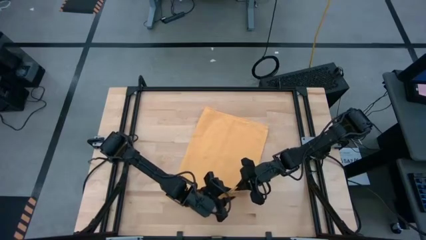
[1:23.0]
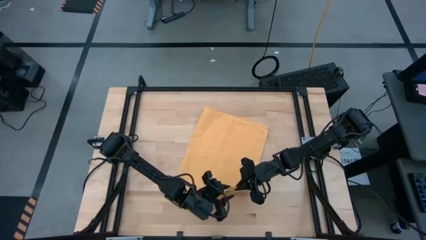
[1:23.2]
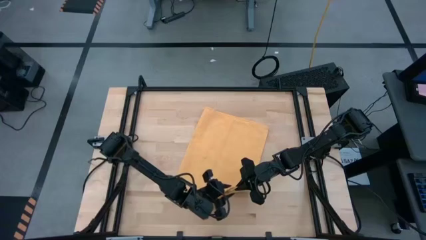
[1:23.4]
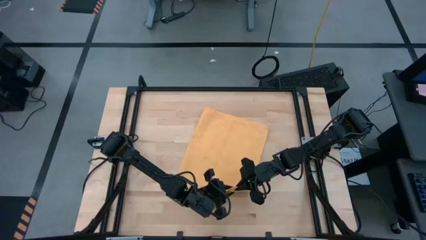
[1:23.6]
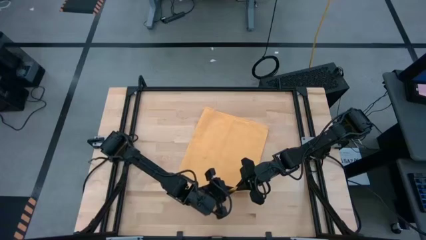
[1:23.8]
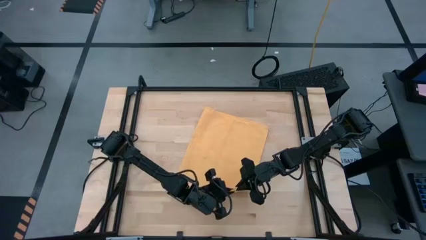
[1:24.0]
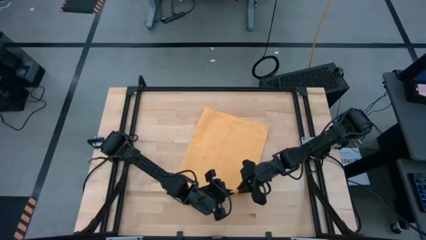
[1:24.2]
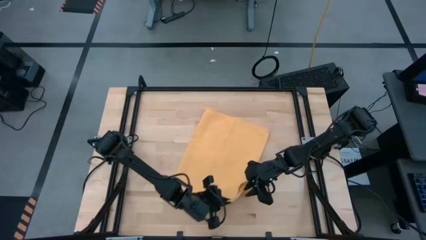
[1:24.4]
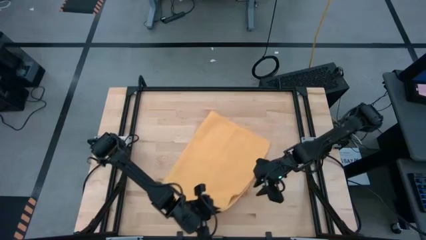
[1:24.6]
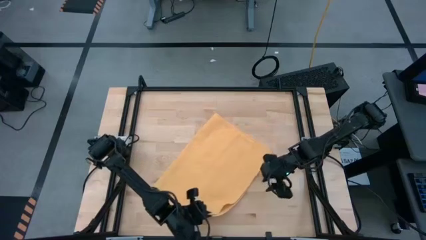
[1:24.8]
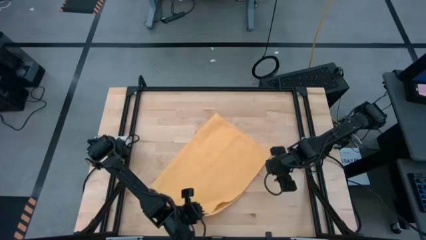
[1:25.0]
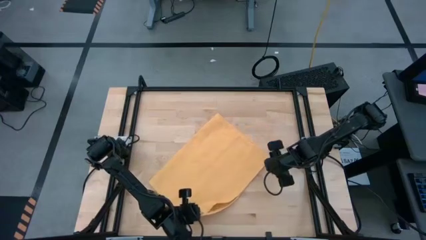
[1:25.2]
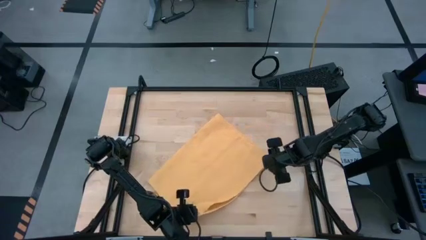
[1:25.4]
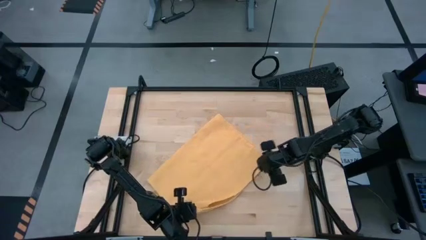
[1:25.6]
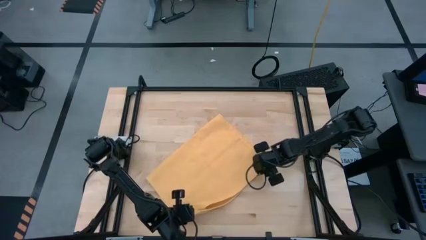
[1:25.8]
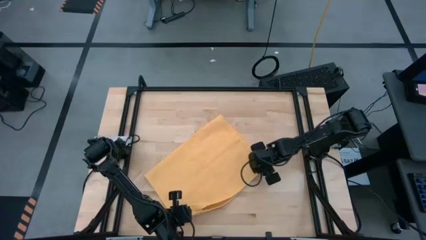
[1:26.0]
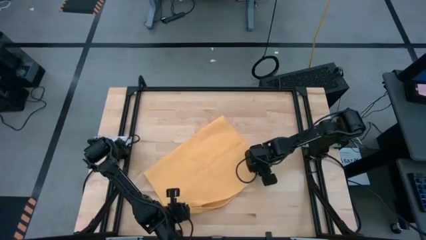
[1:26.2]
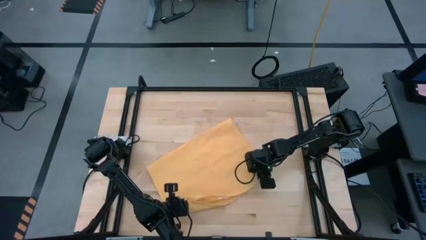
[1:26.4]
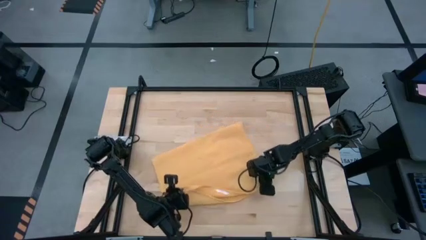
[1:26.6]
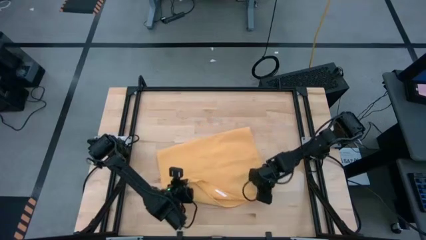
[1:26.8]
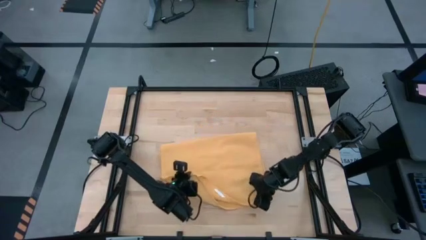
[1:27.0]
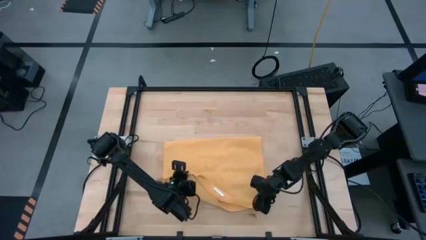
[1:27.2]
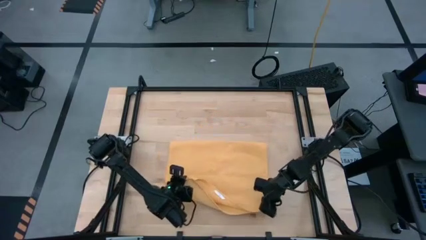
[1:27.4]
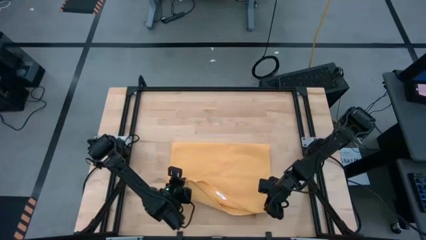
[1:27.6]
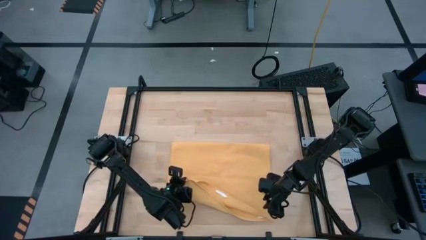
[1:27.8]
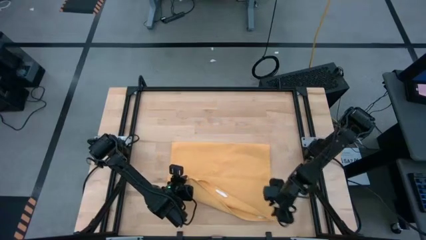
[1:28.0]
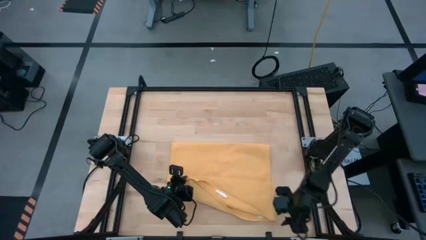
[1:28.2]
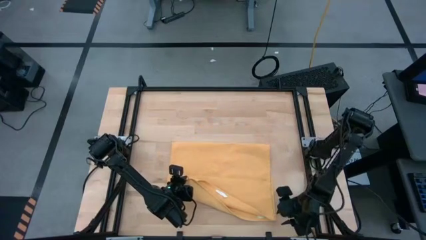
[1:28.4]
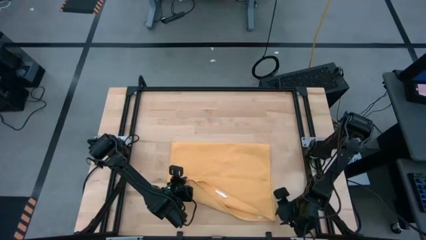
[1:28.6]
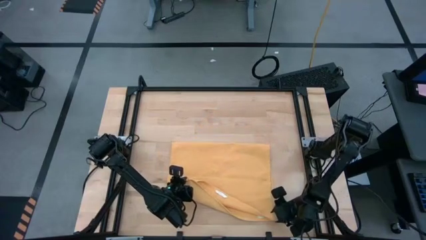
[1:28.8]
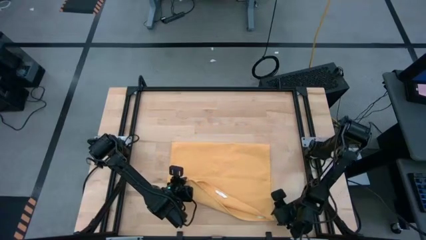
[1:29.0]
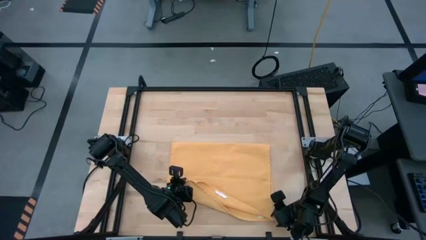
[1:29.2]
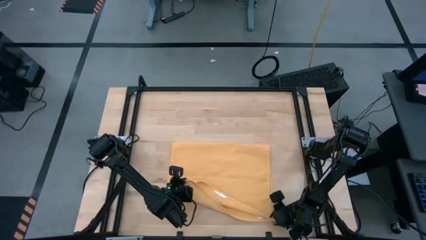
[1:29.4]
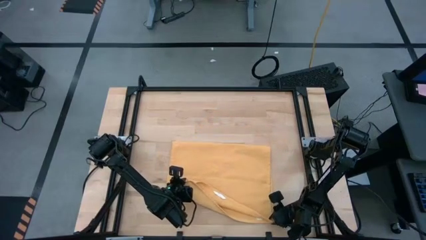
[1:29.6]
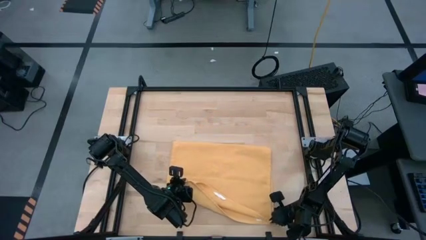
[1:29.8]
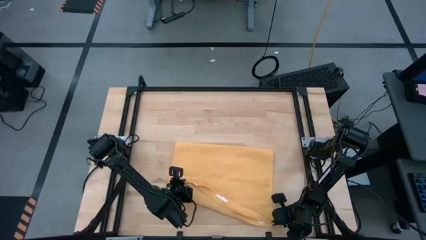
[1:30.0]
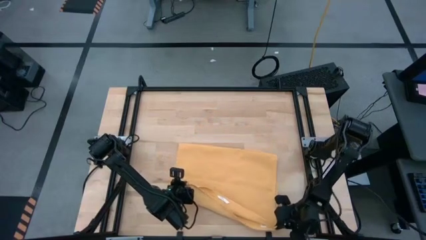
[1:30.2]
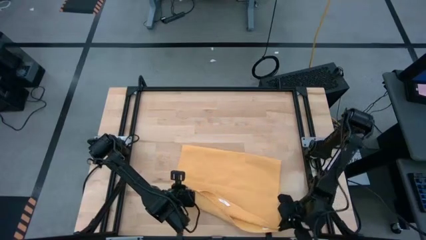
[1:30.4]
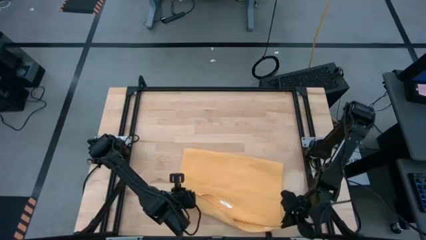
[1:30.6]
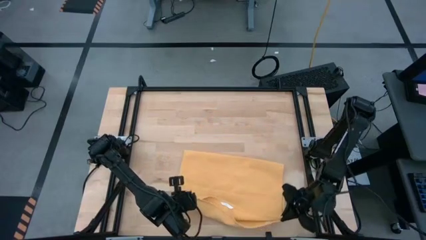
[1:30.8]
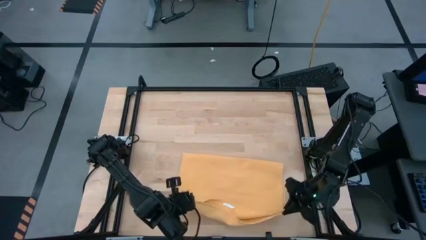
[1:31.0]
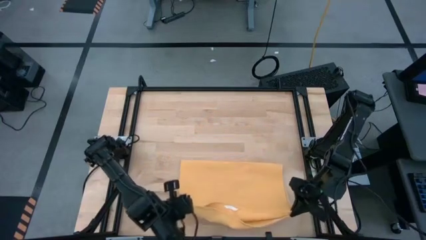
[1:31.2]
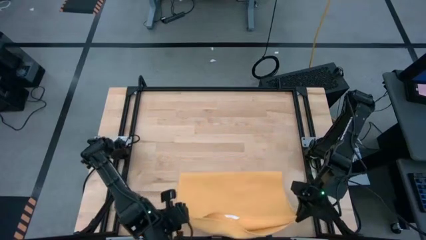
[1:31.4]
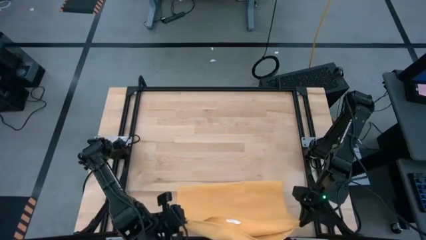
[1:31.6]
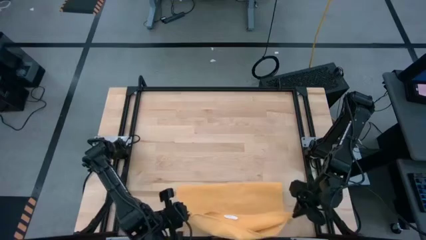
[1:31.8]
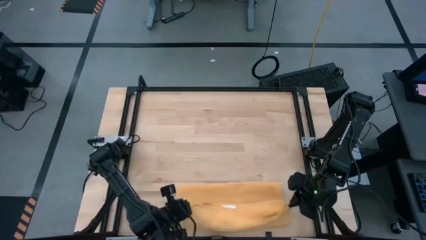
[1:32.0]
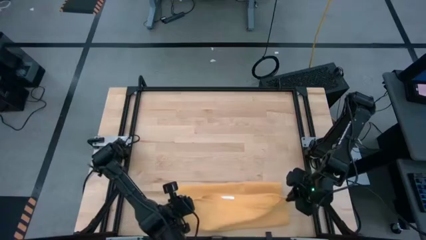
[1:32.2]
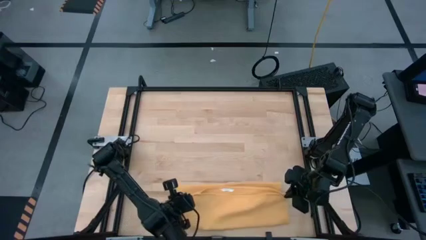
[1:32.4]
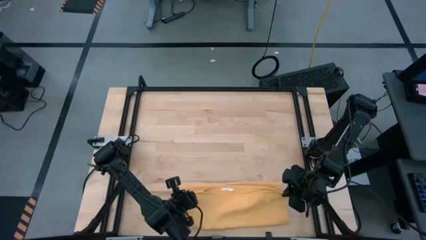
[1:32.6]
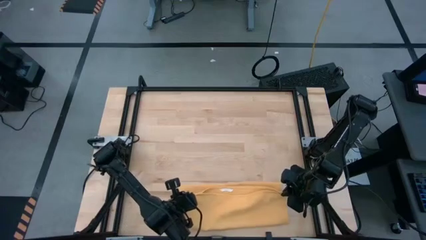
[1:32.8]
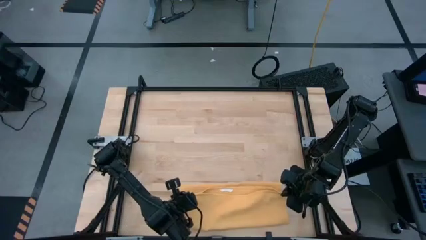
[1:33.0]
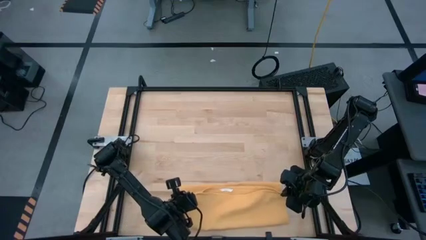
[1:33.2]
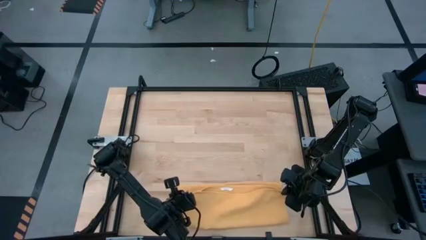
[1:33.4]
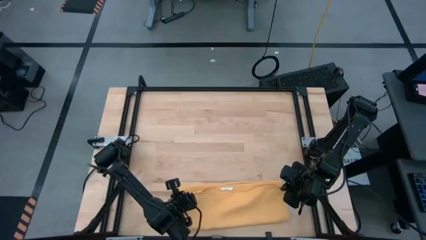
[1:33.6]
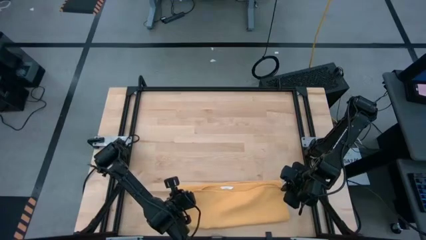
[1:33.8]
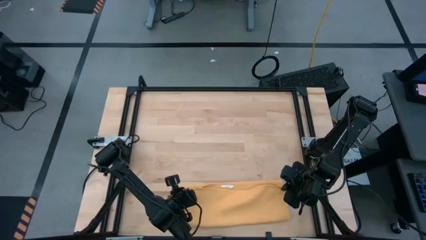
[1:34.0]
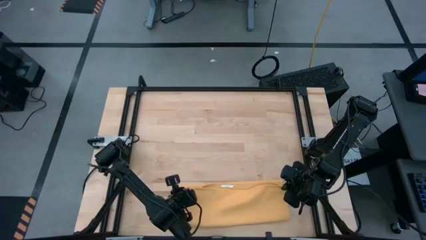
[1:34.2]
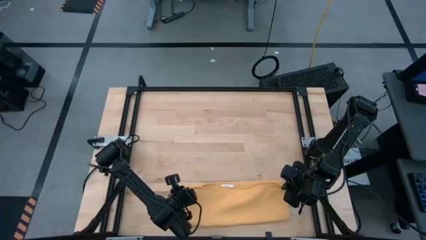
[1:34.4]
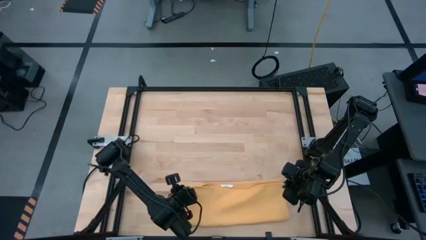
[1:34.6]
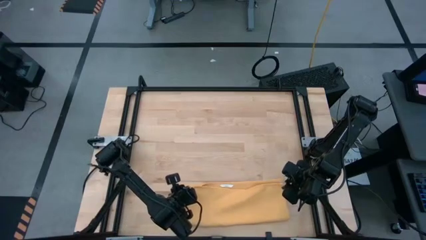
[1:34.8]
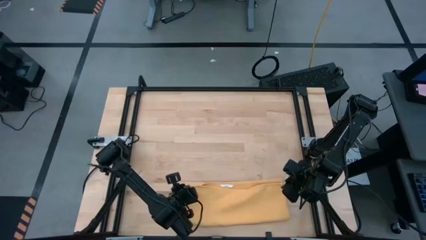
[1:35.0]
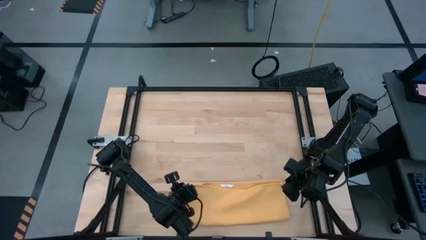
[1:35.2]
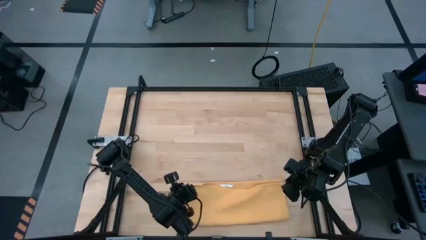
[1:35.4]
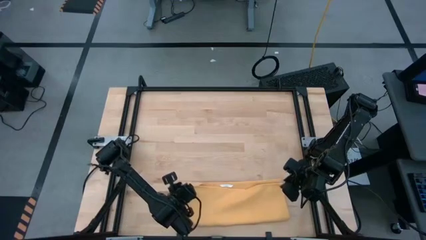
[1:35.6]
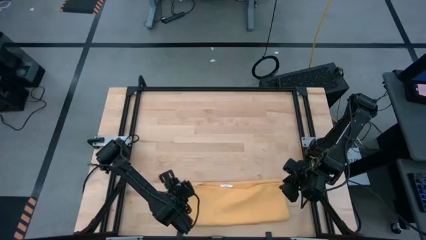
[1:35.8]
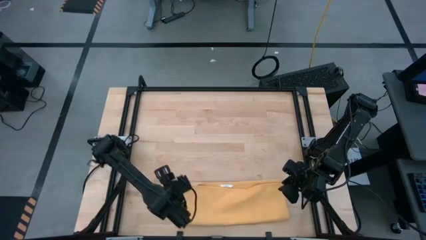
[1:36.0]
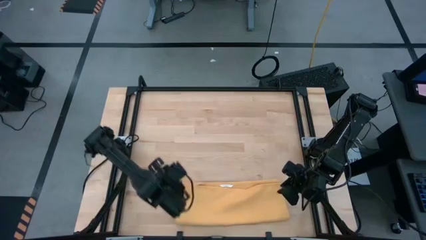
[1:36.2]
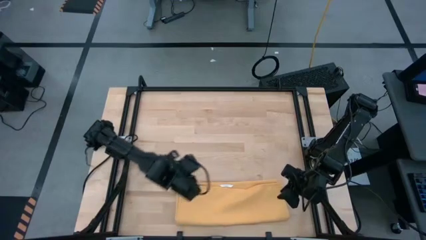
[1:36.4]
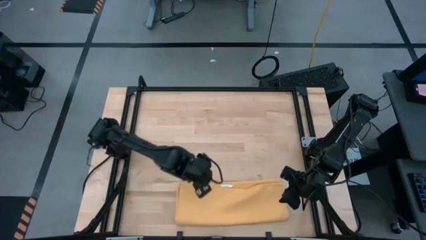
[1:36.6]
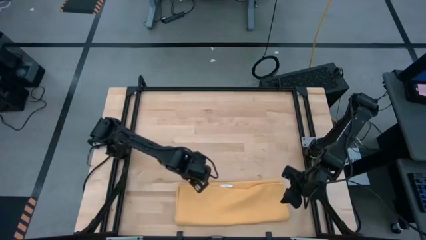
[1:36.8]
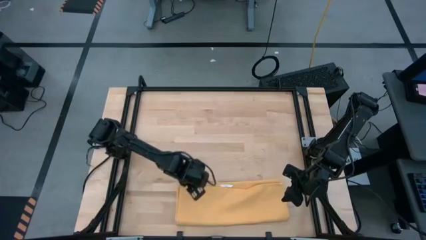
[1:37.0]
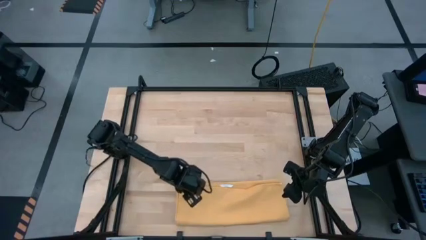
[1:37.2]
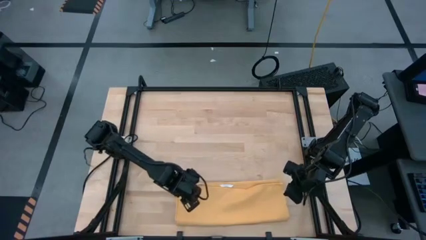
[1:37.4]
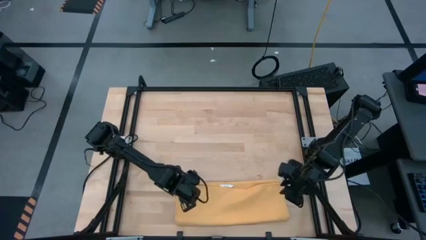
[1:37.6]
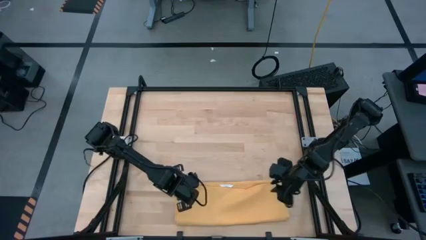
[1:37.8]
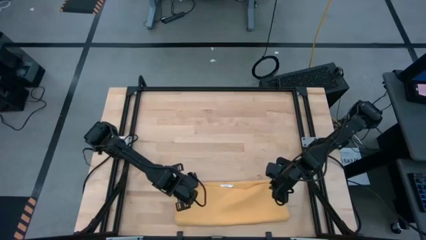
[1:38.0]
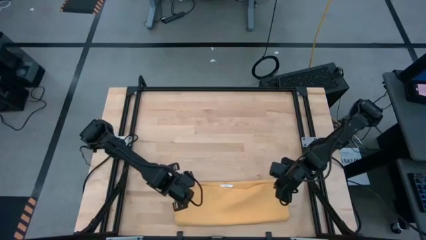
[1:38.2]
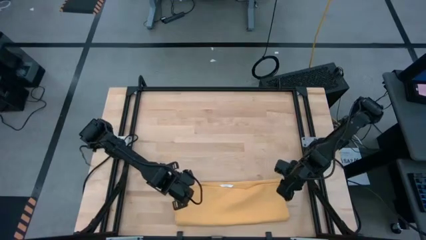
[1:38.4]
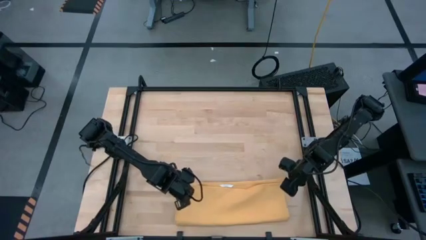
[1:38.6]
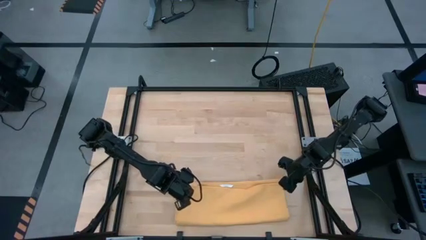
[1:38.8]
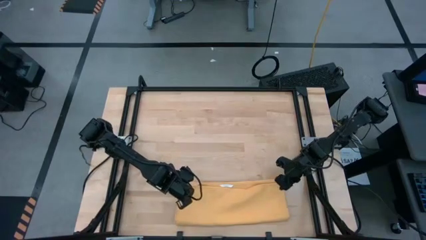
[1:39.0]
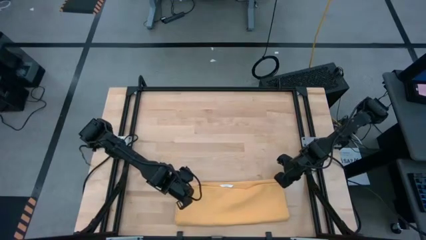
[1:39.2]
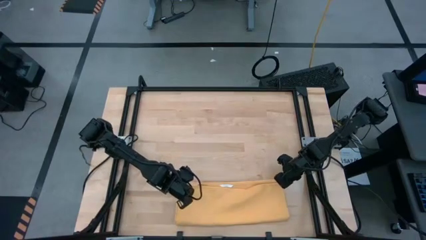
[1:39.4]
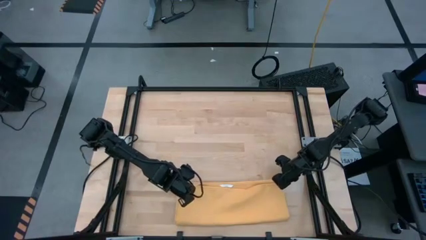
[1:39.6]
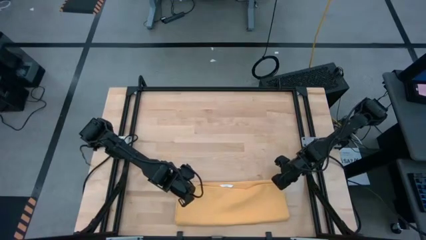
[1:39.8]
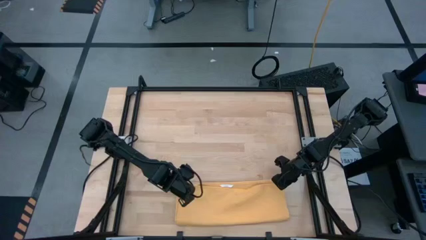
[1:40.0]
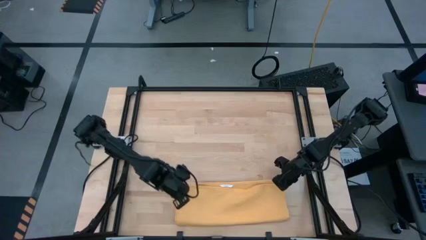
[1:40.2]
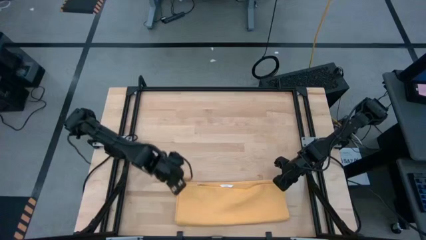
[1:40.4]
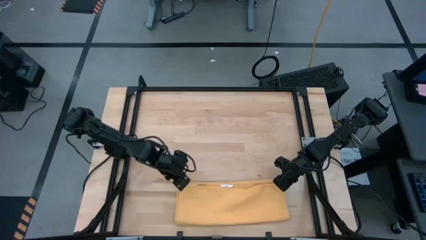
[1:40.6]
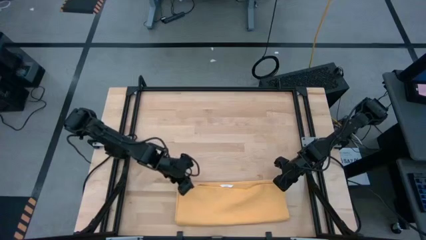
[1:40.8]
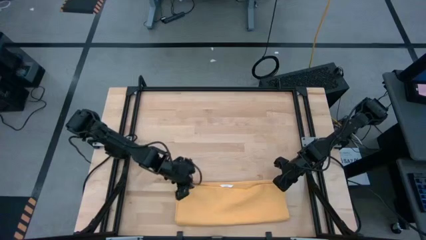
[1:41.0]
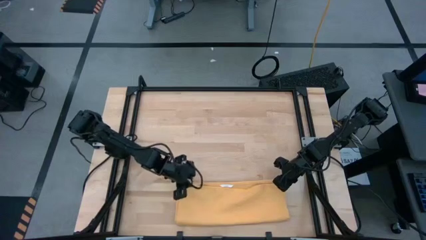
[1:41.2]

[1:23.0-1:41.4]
Task: Roll towel
Roll the yellow towel
